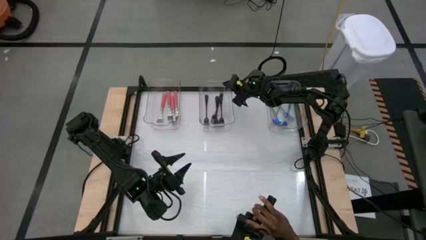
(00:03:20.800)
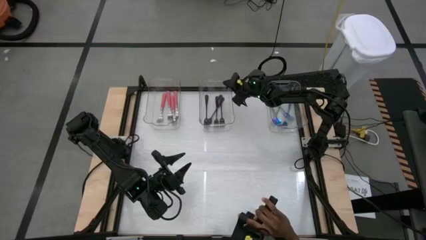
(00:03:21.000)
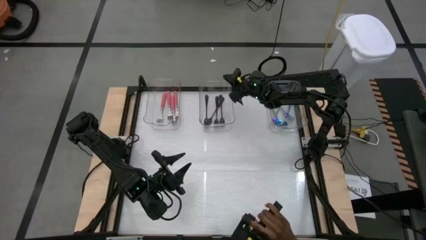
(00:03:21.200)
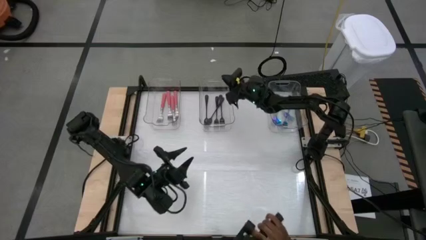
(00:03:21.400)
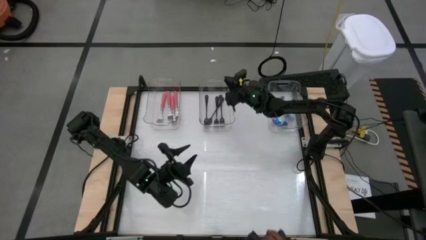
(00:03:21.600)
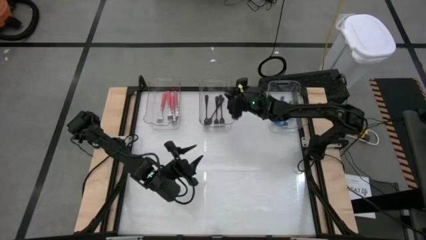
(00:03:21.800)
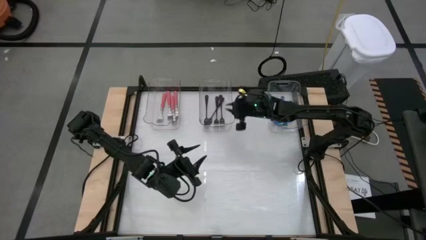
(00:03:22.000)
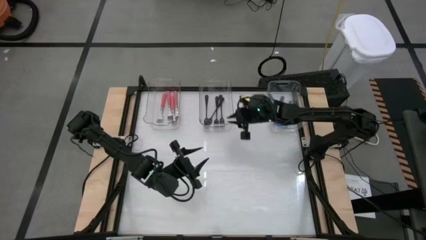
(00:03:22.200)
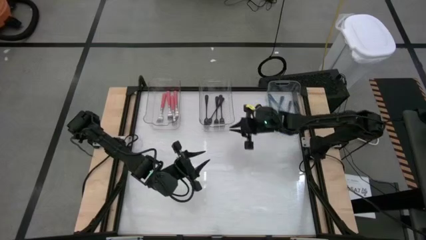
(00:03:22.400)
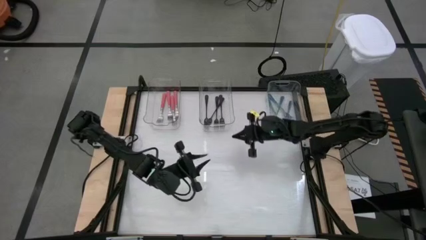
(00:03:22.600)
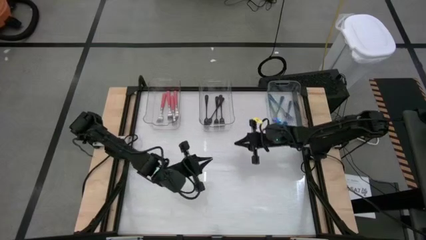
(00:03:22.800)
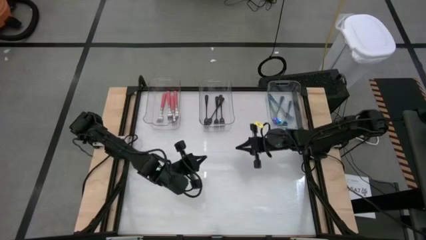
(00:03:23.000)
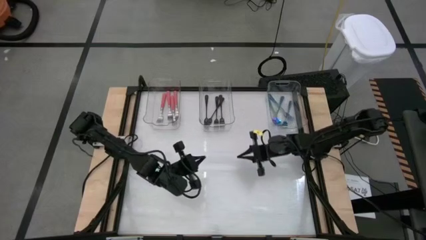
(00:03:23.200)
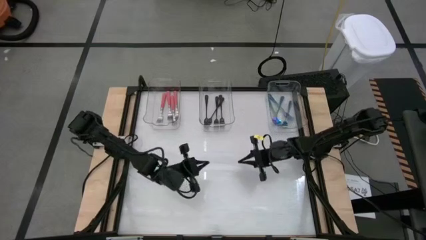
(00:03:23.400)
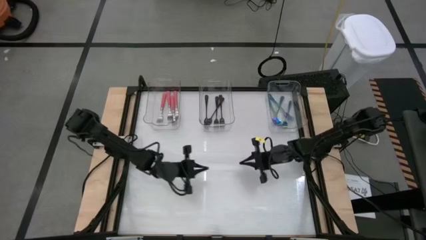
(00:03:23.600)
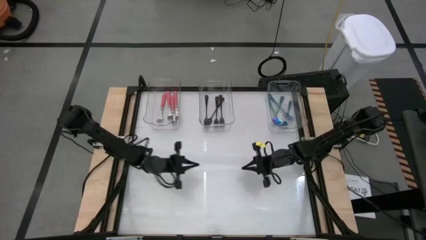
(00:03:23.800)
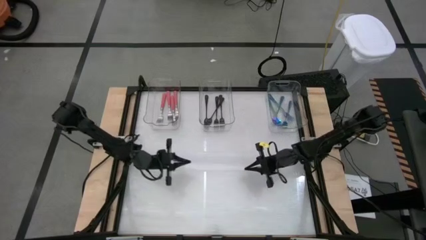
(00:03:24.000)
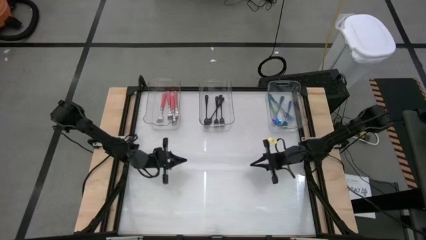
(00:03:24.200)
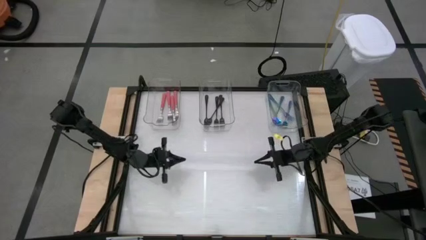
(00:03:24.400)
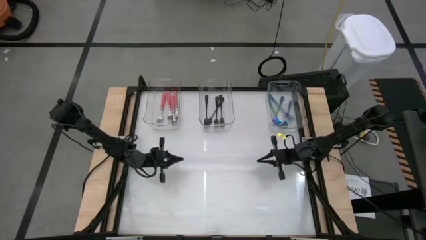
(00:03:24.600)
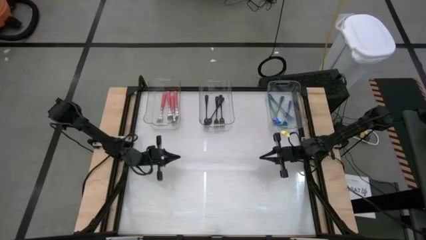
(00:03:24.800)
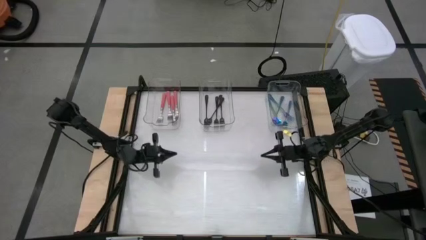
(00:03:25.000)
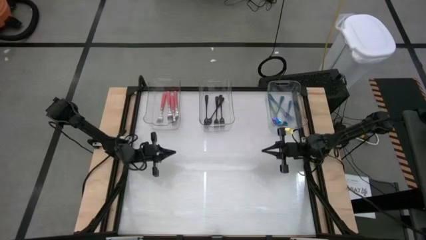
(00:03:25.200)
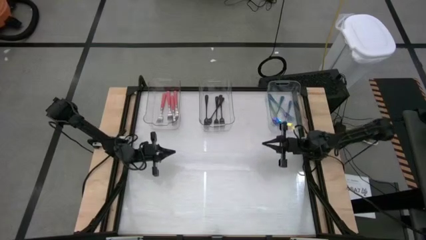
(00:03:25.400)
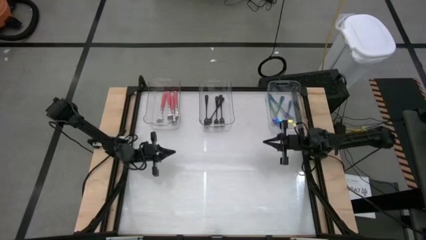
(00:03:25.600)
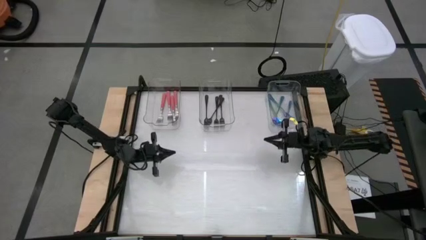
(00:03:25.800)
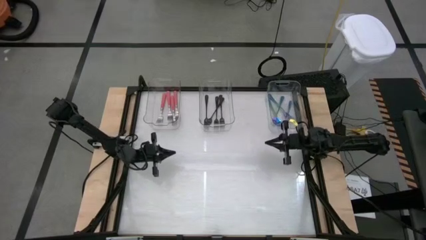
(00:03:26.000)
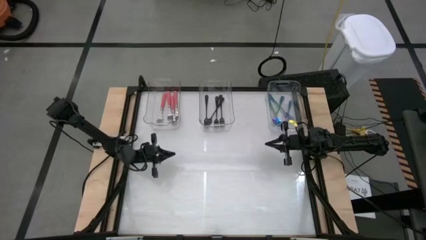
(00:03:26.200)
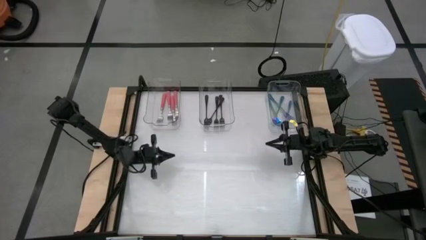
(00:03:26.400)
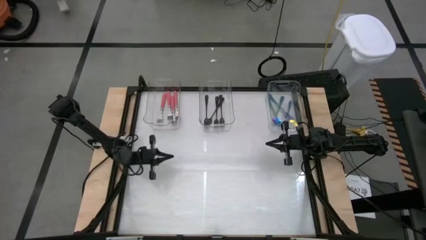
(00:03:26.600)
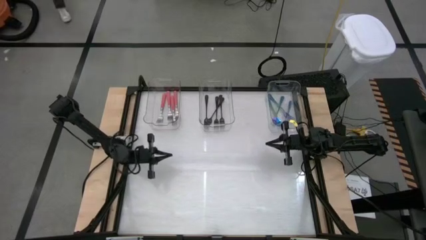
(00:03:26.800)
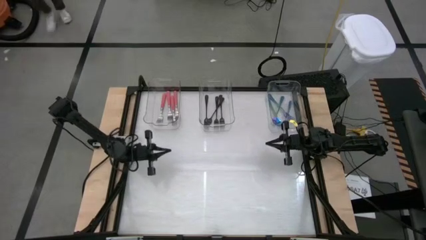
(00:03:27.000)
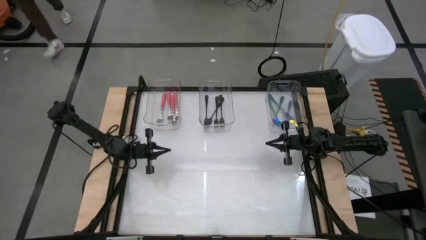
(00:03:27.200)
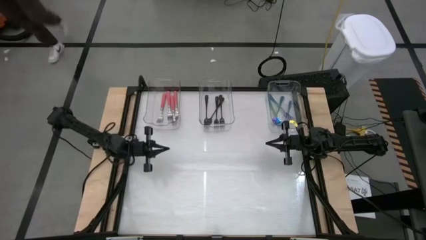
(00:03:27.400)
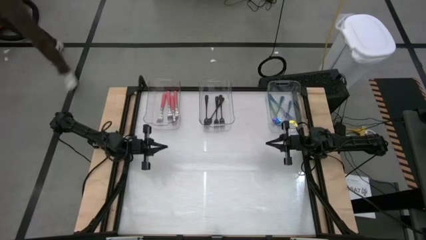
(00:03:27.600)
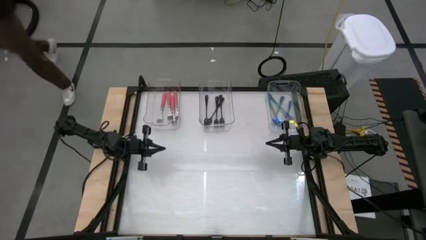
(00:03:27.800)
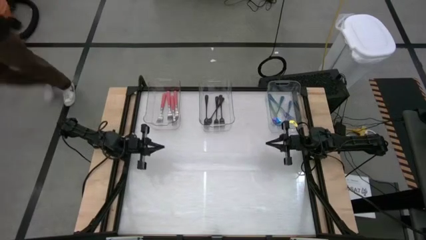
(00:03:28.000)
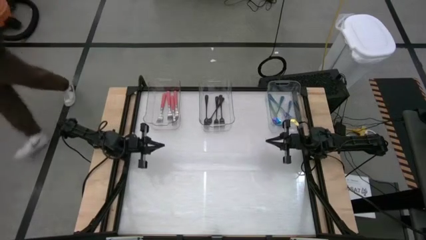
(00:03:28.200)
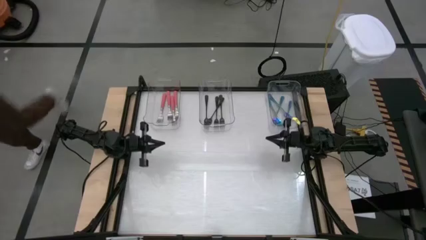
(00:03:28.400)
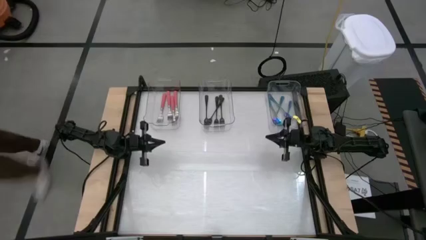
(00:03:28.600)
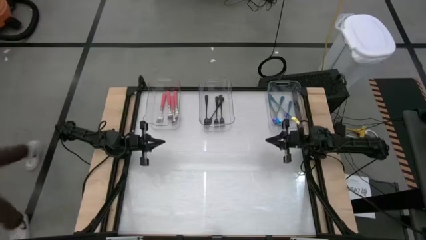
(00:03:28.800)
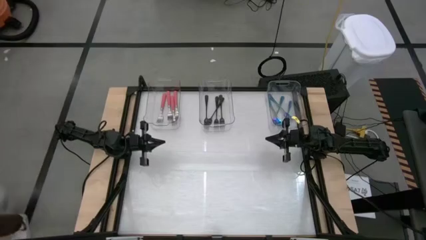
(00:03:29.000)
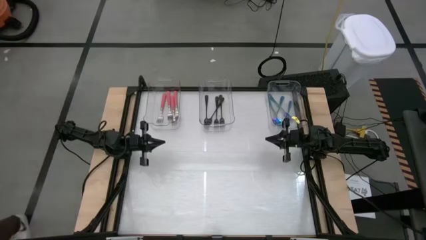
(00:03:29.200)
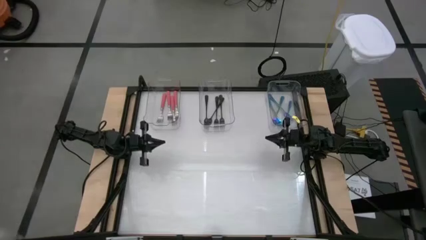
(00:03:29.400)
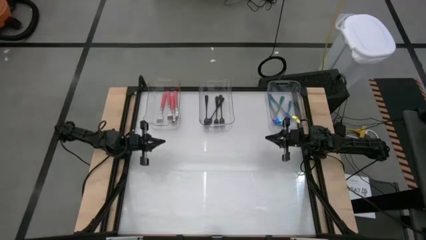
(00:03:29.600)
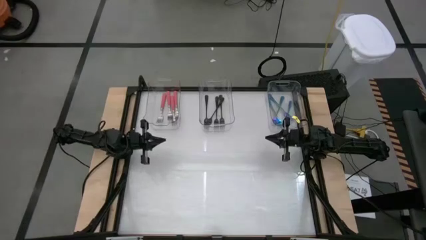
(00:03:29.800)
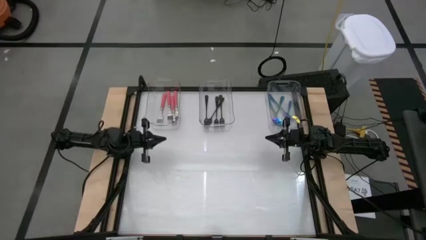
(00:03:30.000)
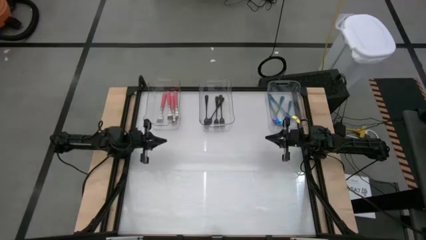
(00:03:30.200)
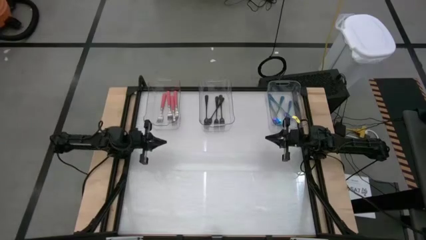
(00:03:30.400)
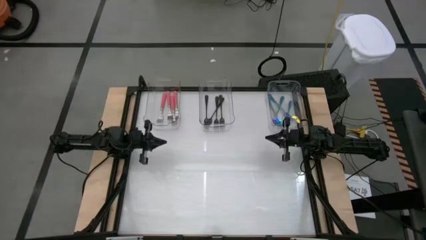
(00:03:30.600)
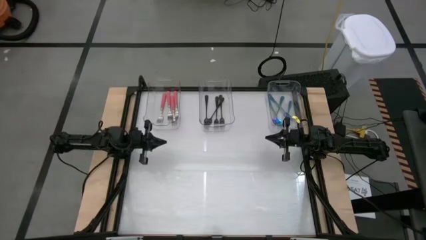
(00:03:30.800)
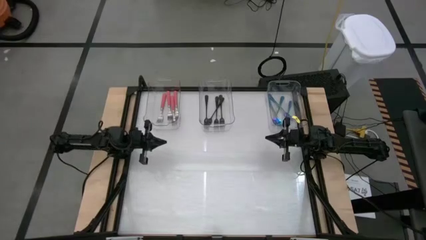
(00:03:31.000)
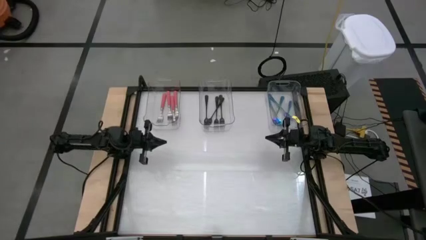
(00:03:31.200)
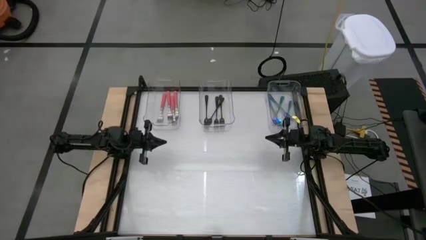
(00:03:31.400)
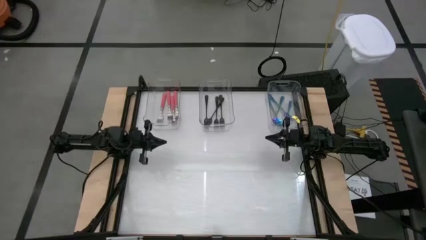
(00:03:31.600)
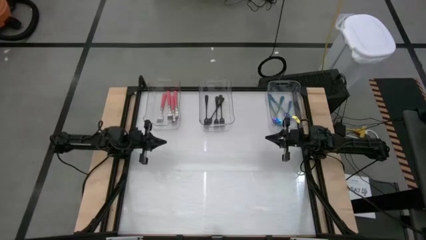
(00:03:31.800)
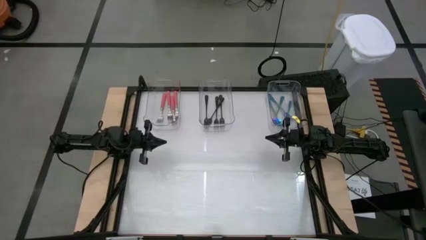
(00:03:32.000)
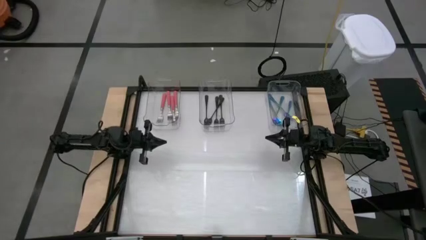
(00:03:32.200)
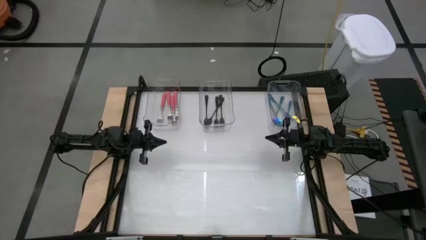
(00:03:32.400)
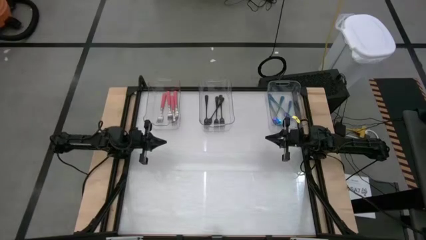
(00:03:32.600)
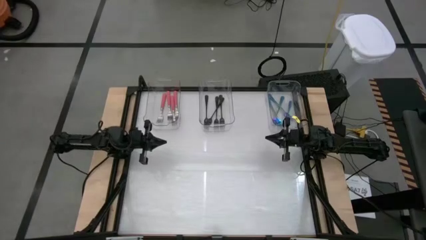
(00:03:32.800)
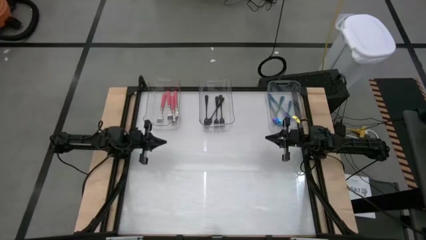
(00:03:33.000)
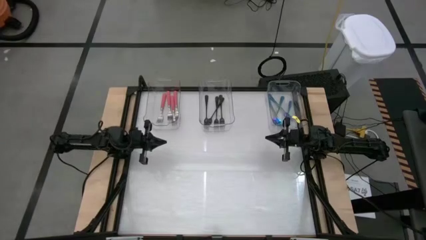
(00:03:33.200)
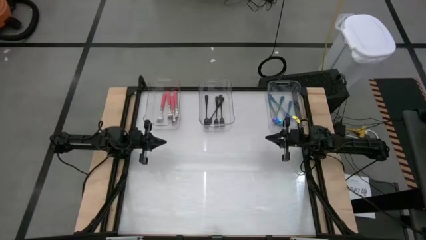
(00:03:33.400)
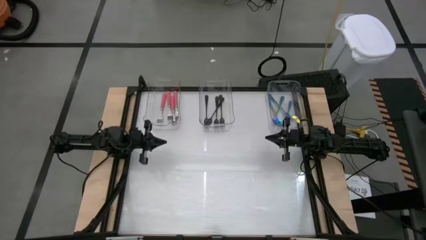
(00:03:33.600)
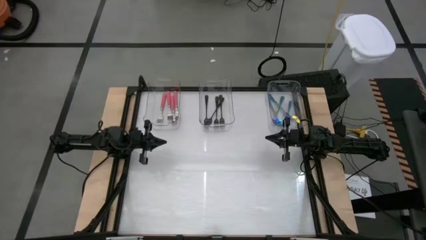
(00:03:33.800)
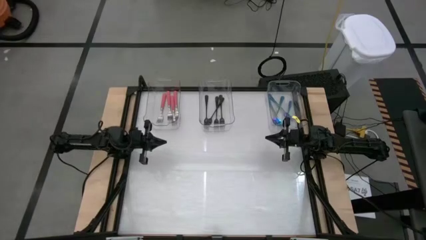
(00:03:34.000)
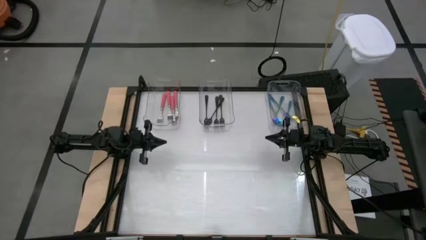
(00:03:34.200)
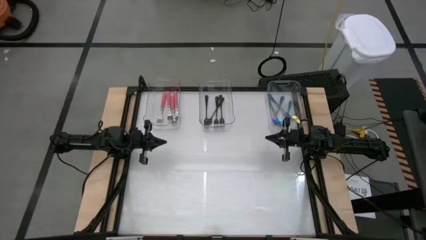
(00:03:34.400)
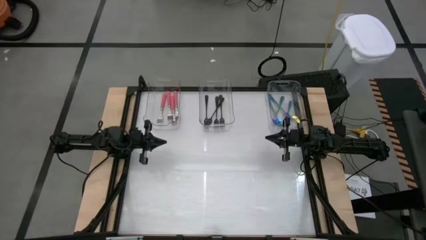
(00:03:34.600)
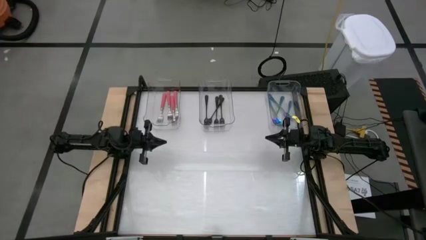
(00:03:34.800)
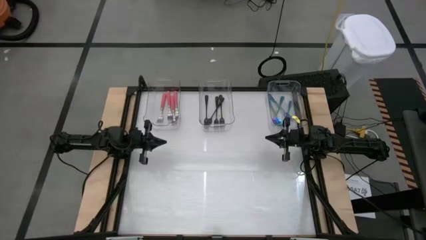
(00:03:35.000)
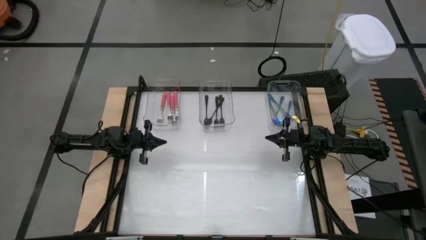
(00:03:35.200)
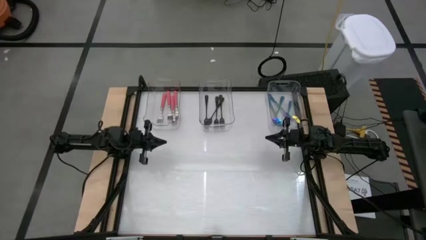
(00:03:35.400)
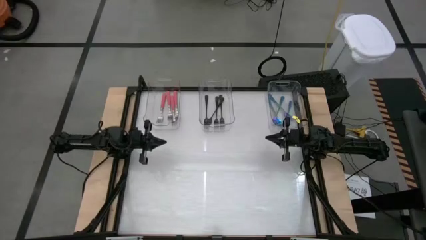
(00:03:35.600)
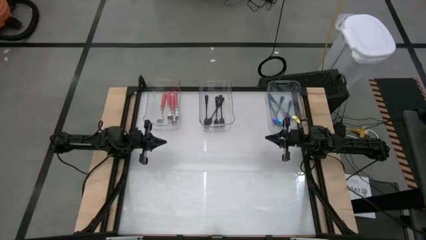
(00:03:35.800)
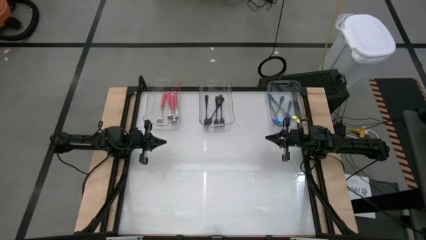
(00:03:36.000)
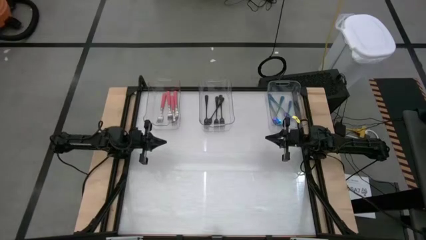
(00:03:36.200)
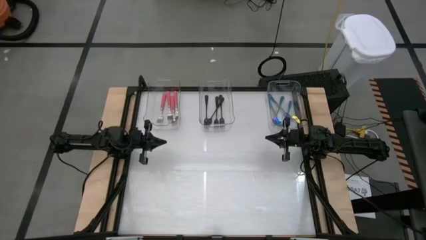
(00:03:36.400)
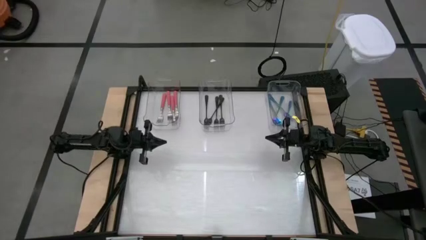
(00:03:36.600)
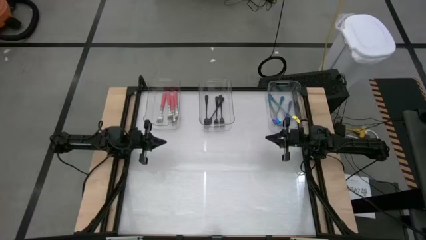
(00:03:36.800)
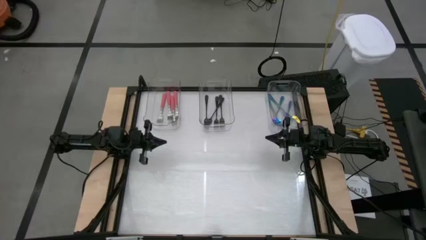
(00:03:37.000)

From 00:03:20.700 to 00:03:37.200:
Task: Sort silverware by color (type)
Return to Home Position
